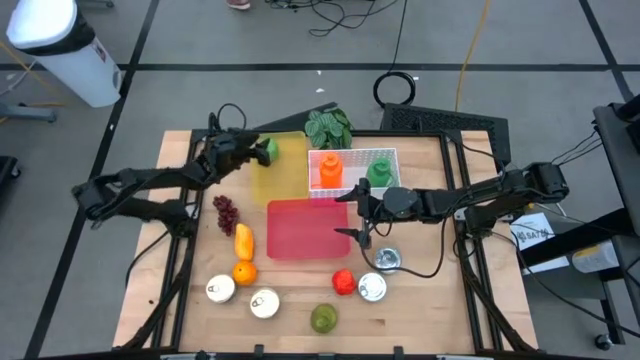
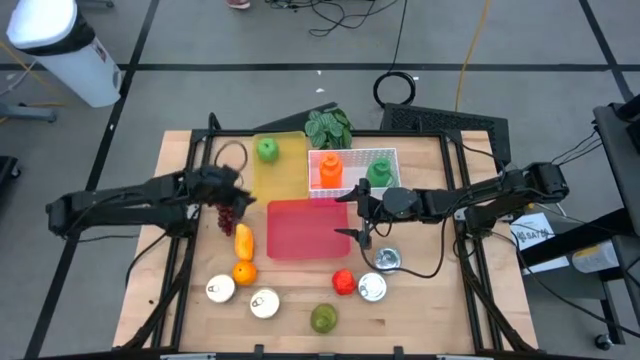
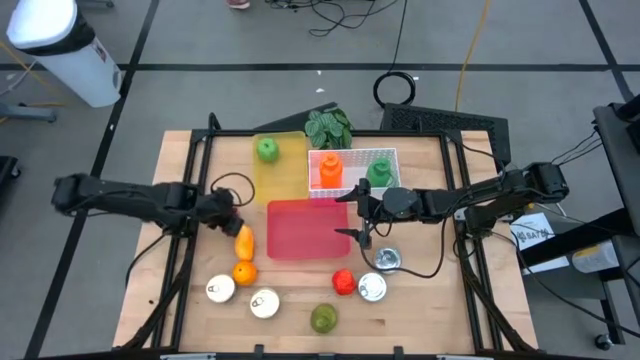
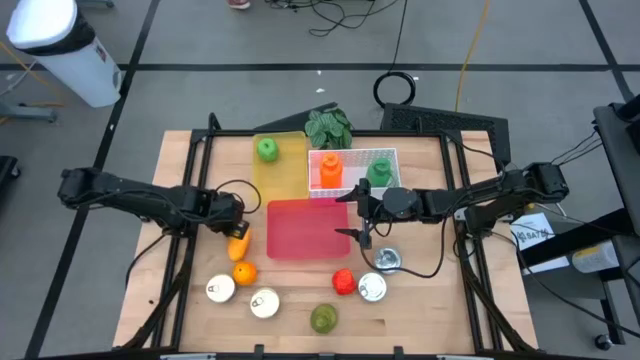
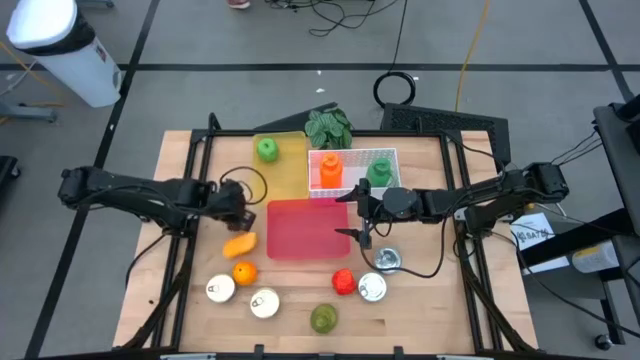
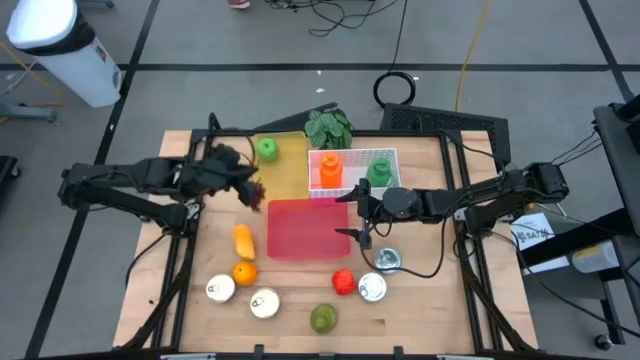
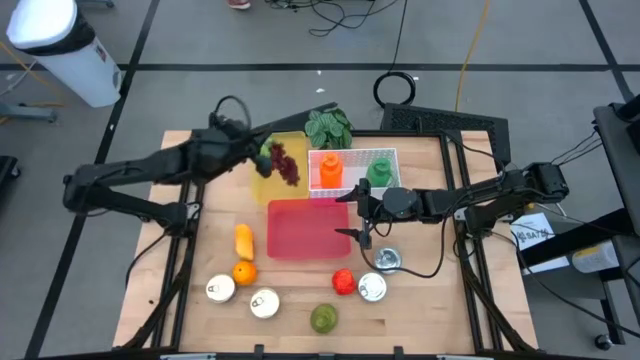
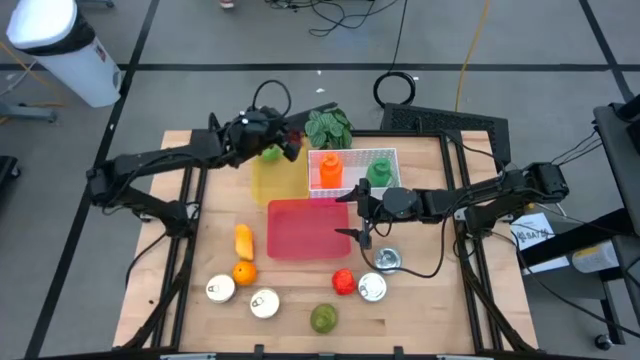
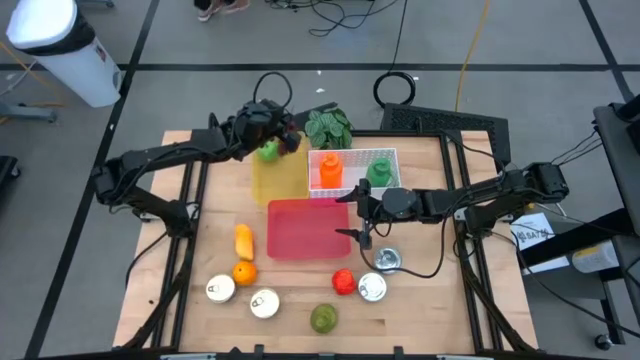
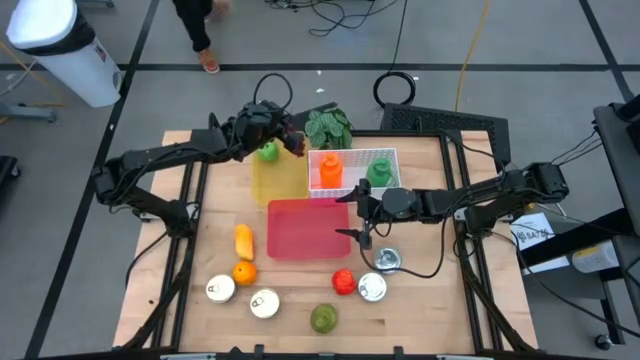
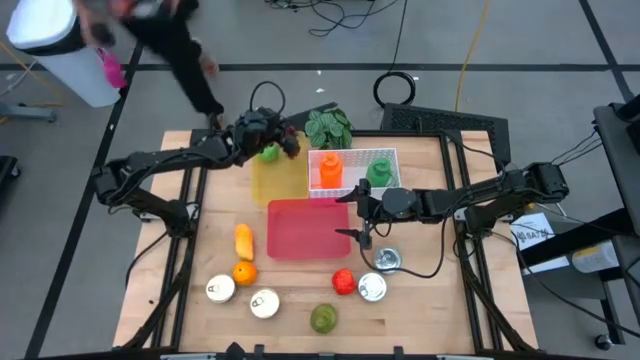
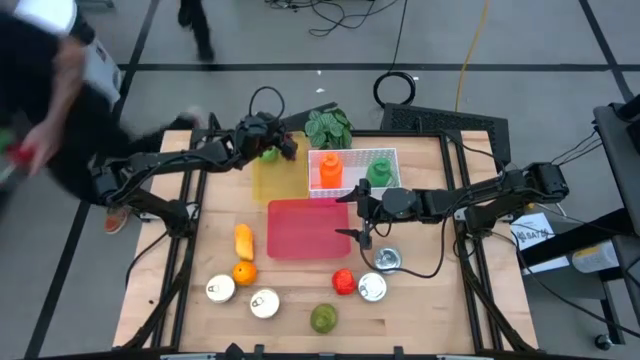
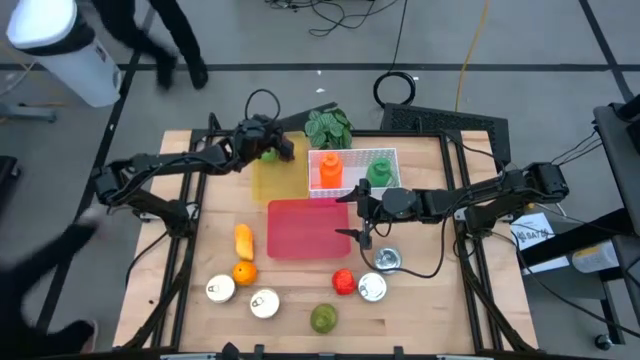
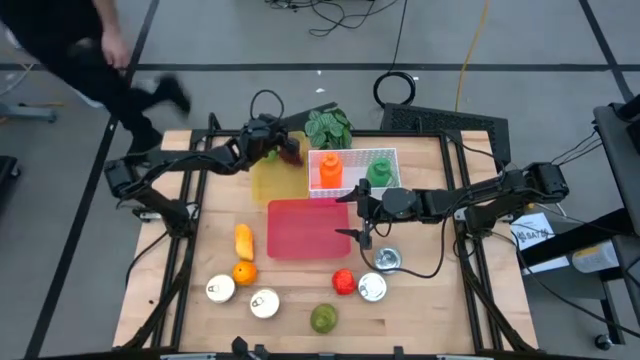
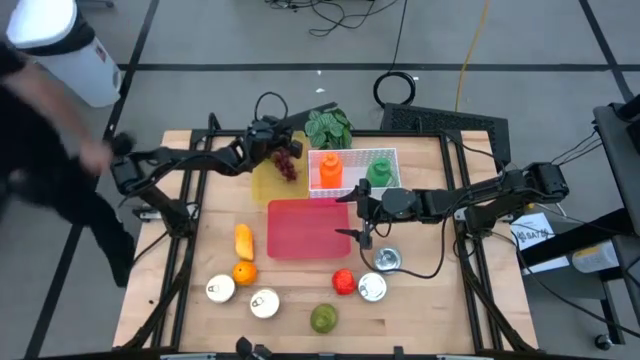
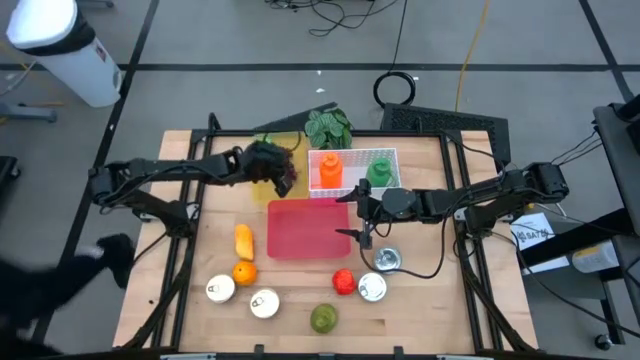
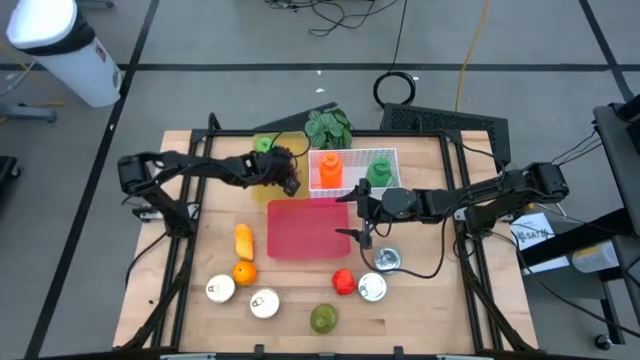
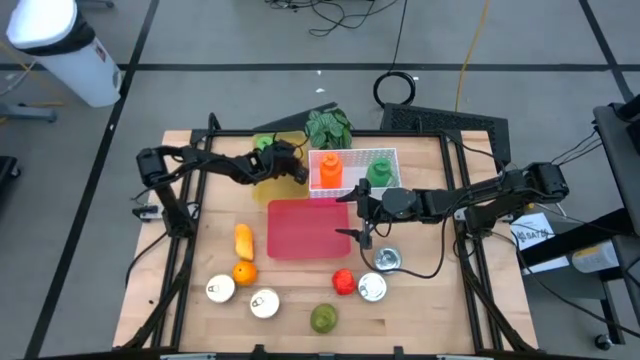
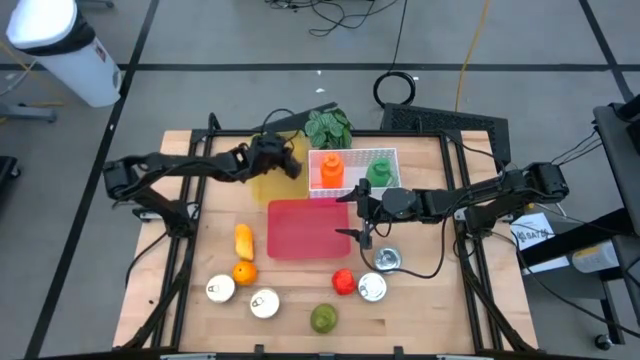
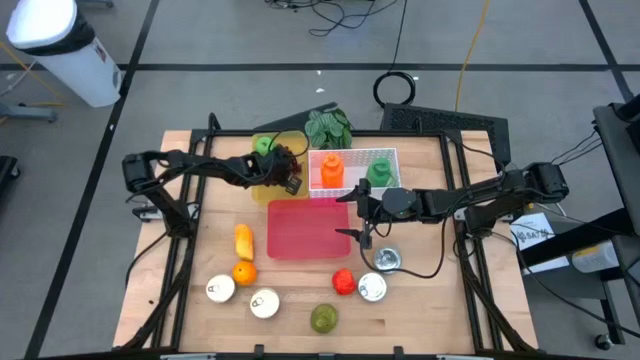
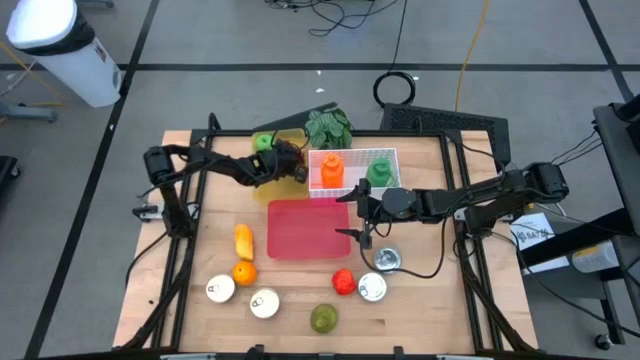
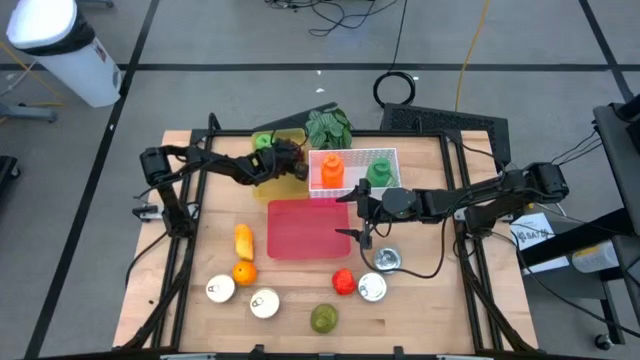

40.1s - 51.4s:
Task: Pick & Place Food Item
Put the red grapes in the yellow bin

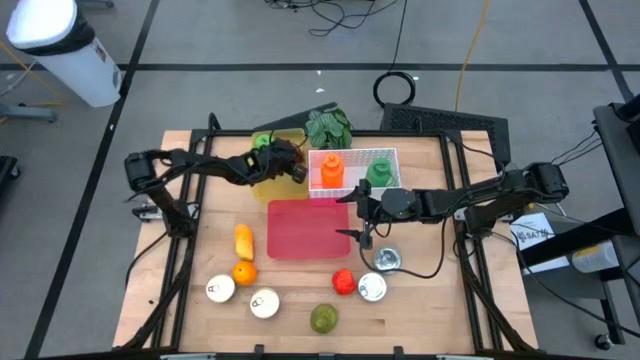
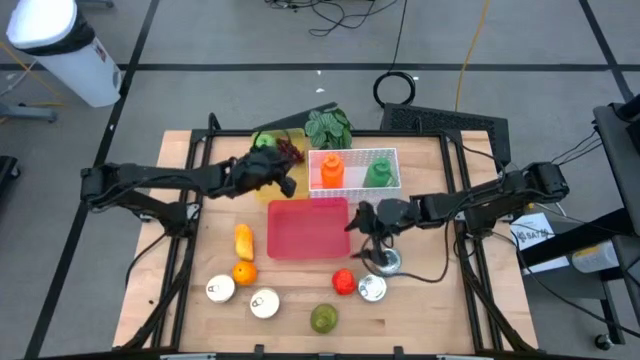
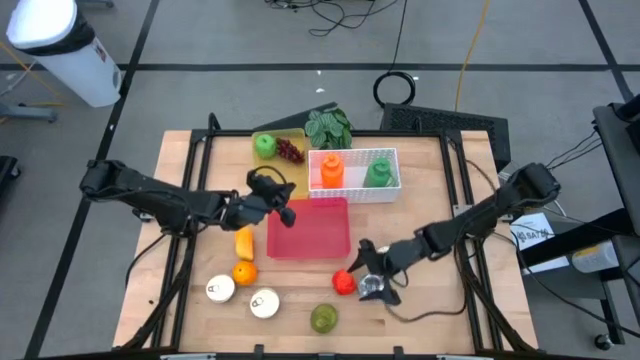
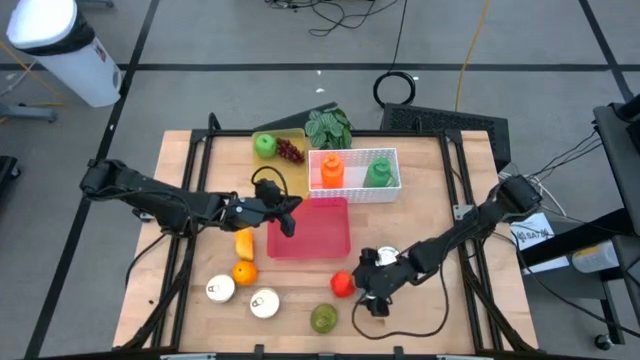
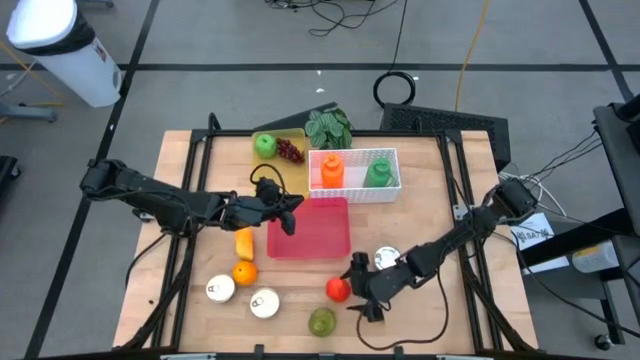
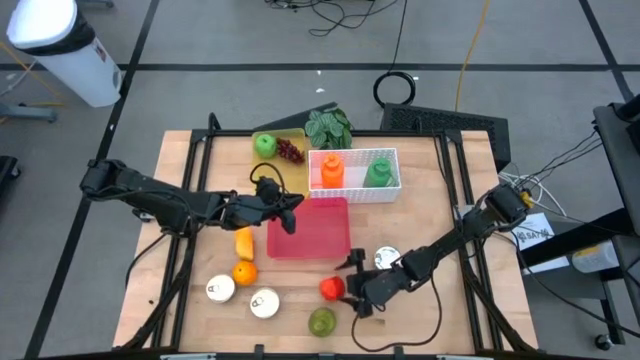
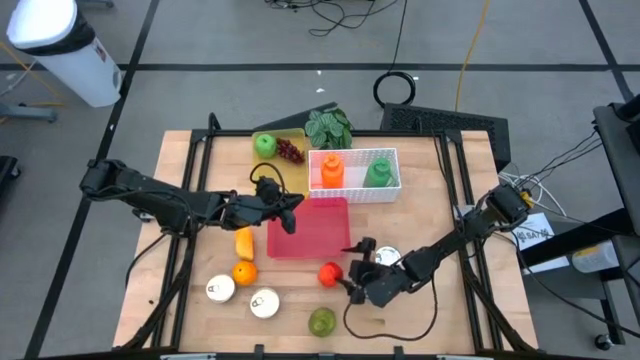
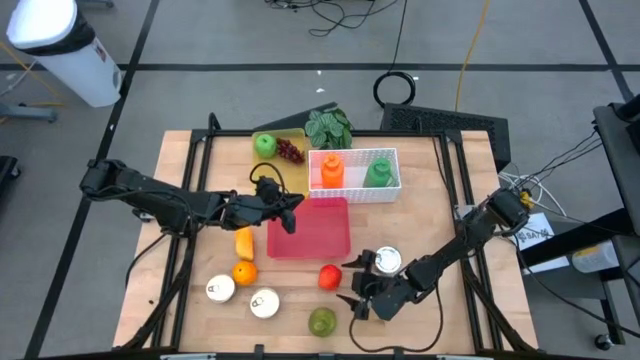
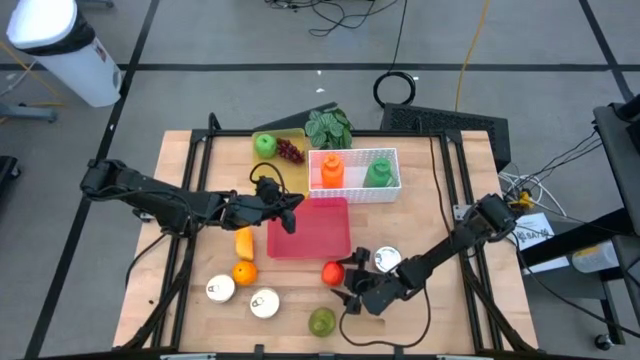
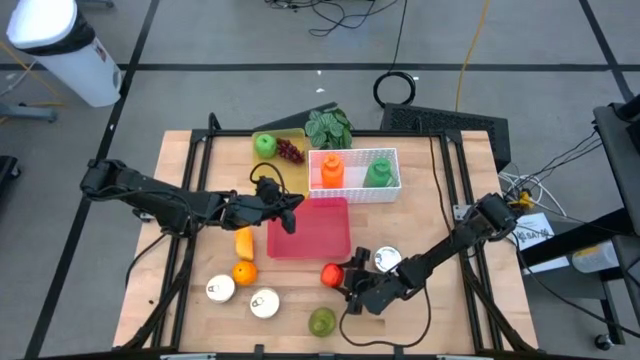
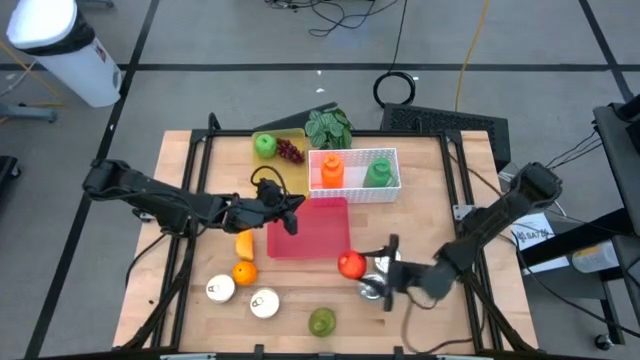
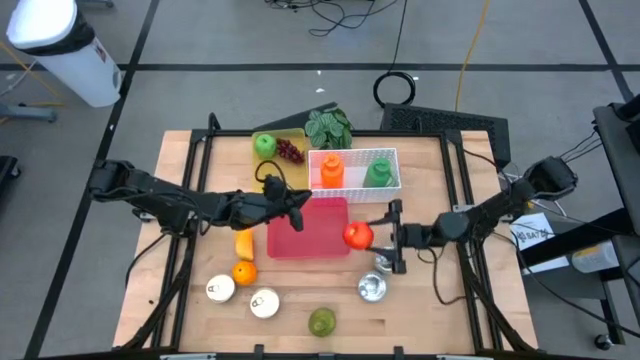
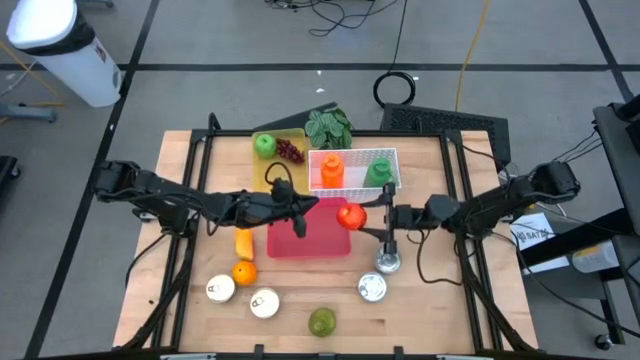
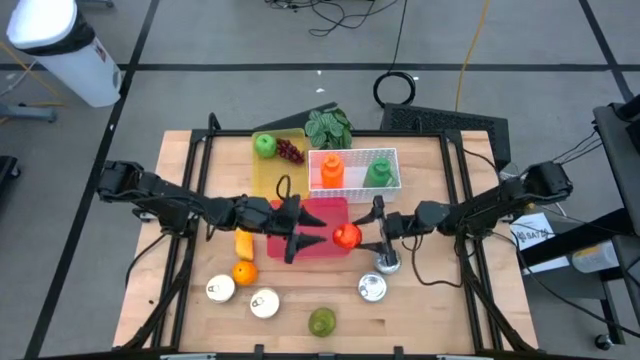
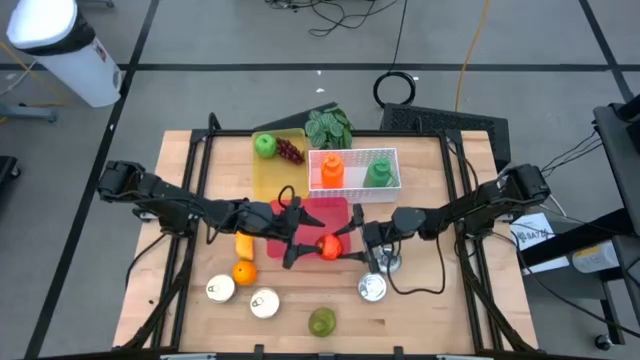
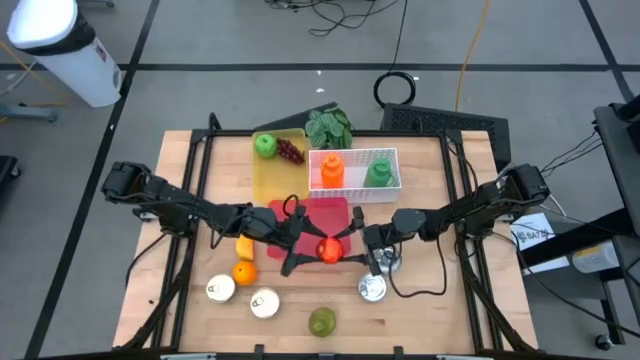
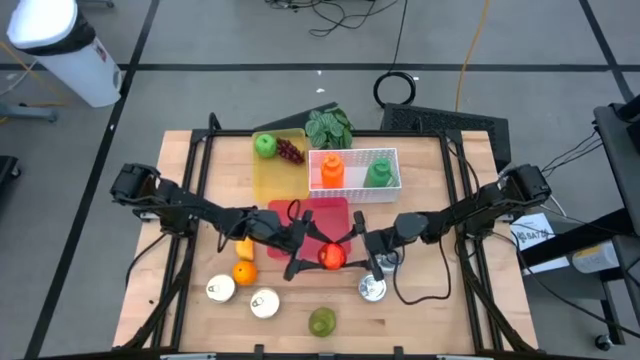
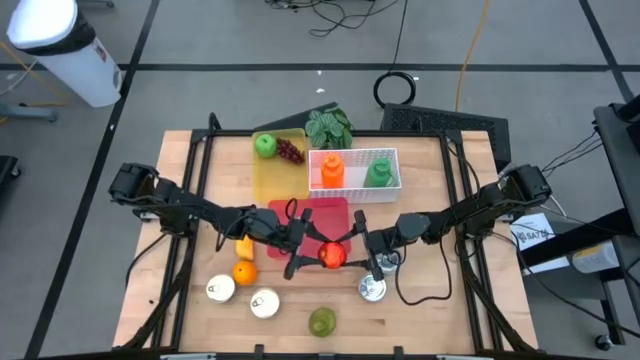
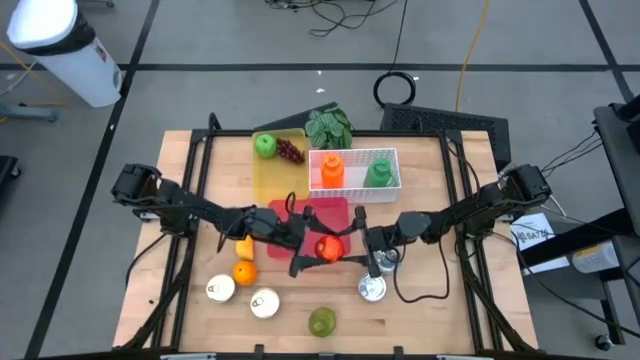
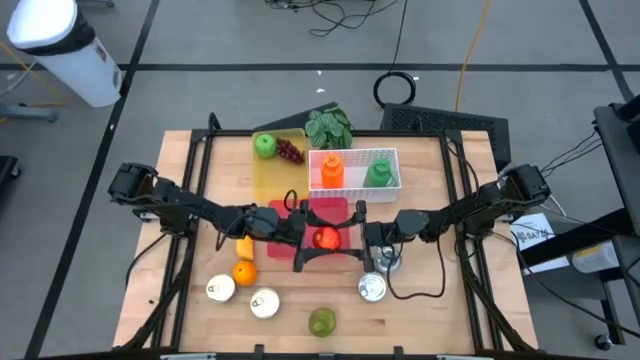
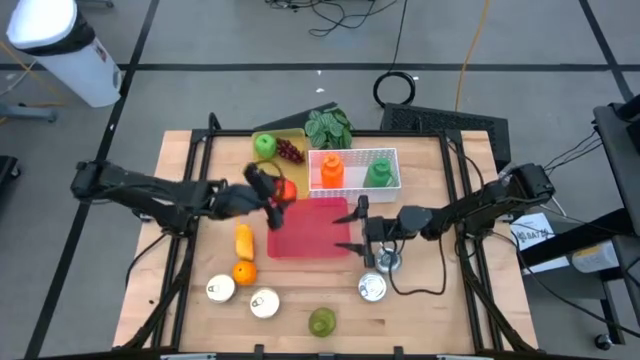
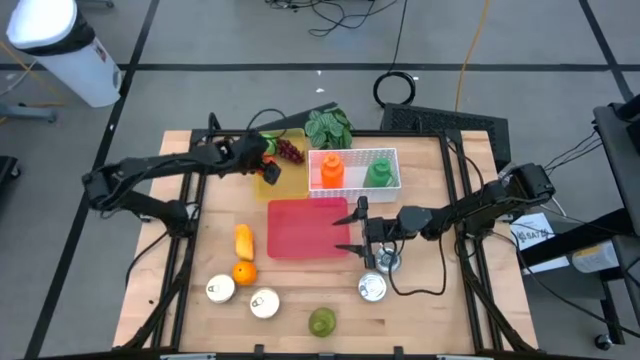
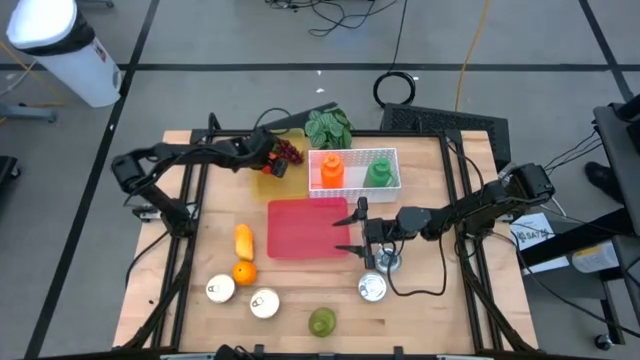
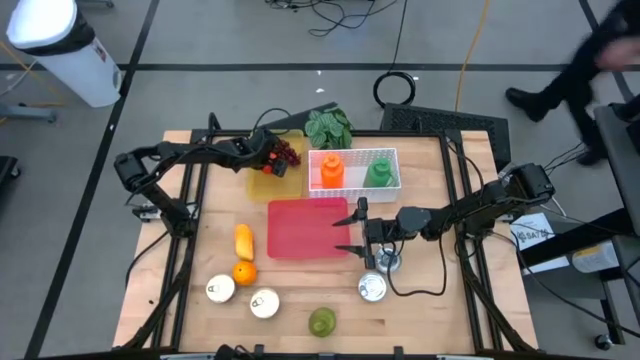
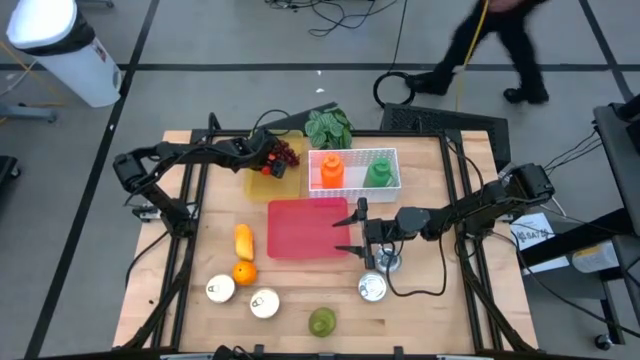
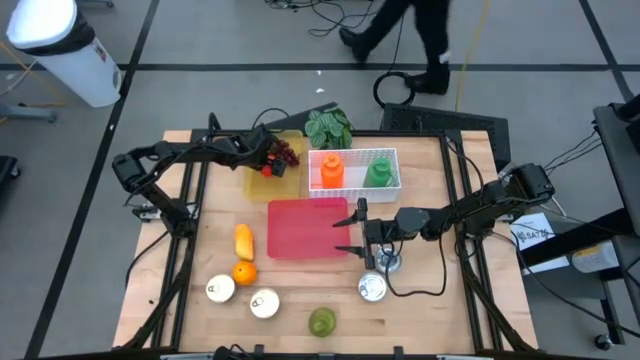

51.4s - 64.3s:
Put the red apple in the yellow bin
